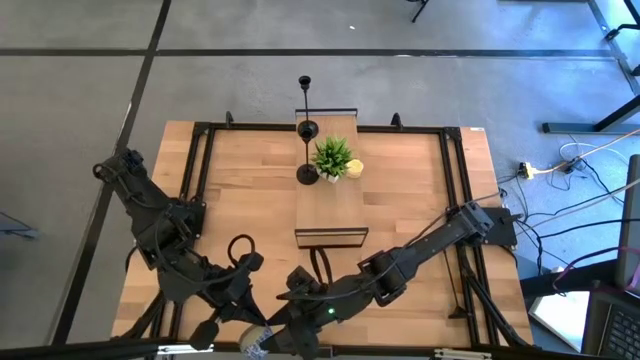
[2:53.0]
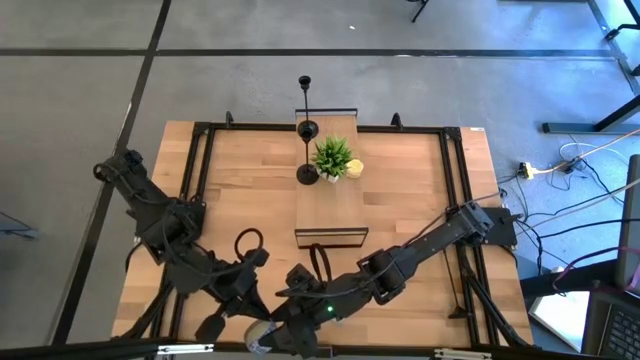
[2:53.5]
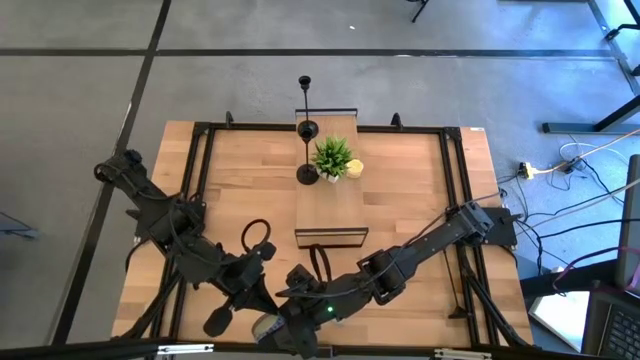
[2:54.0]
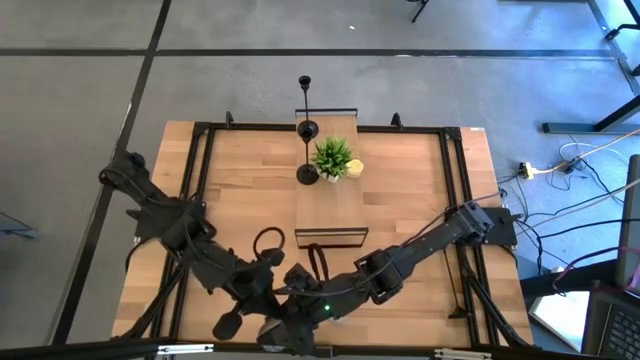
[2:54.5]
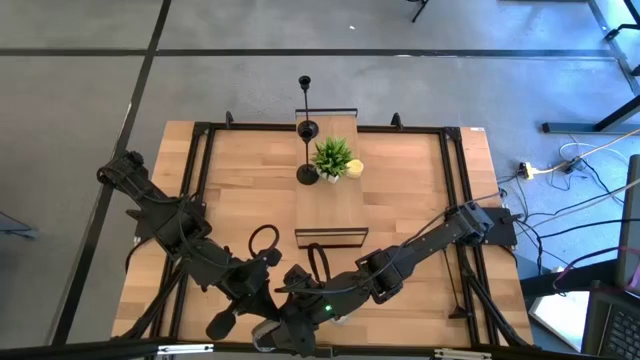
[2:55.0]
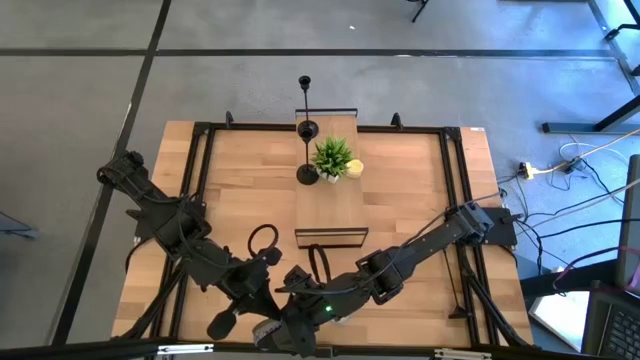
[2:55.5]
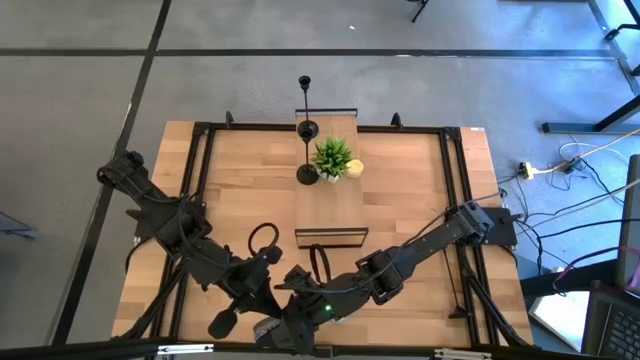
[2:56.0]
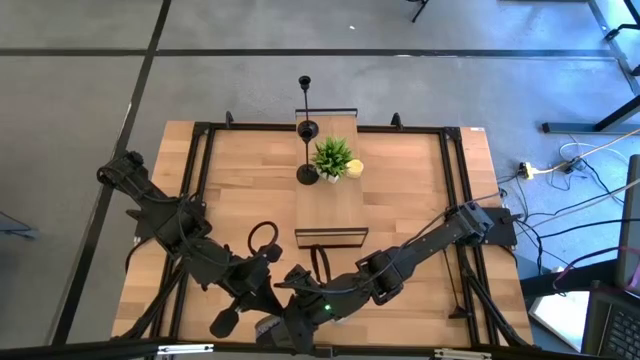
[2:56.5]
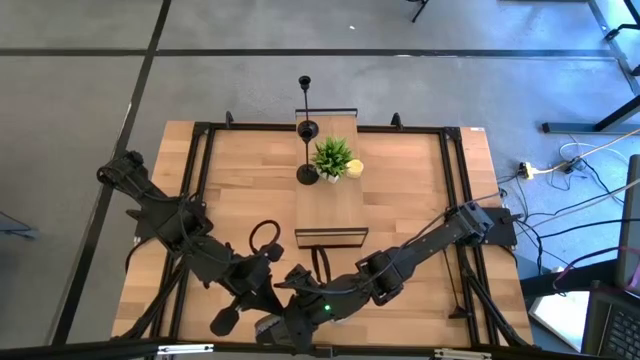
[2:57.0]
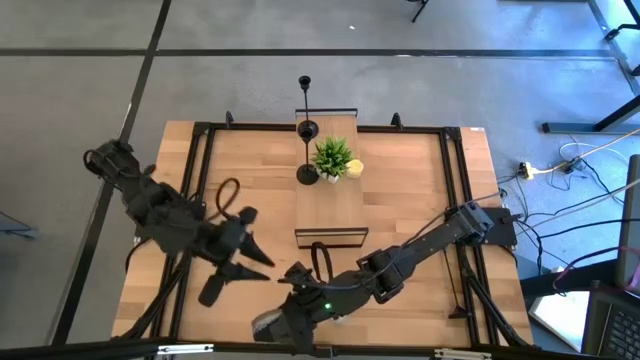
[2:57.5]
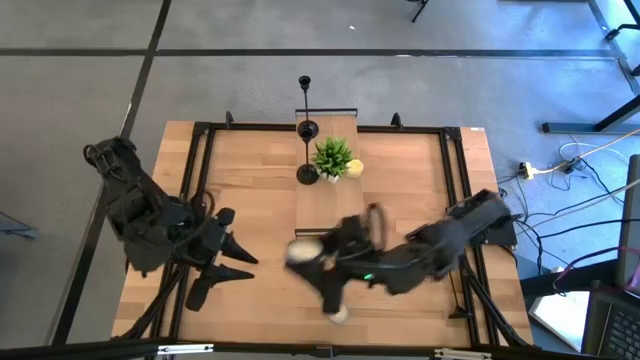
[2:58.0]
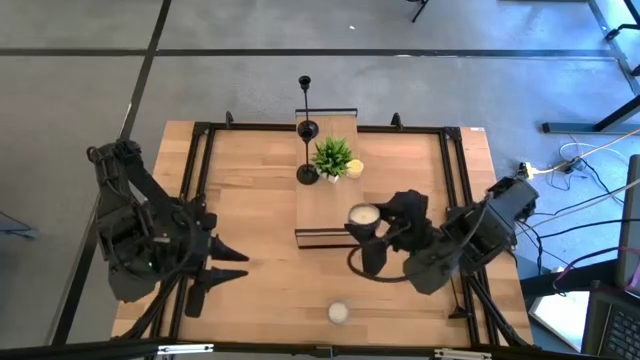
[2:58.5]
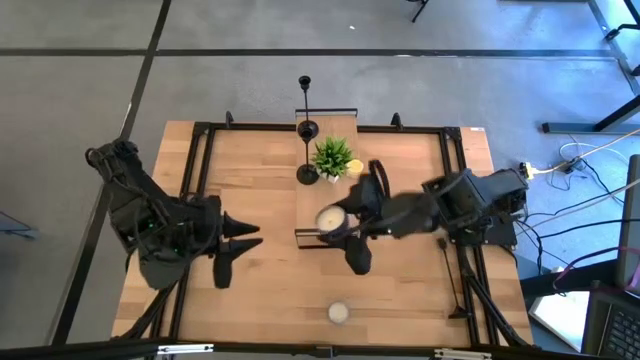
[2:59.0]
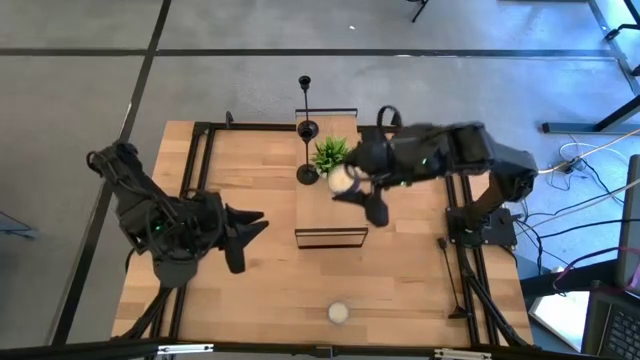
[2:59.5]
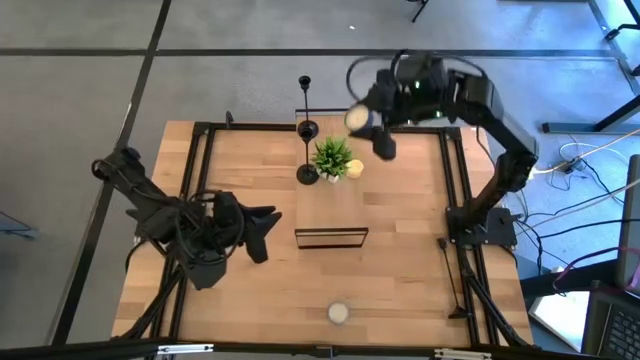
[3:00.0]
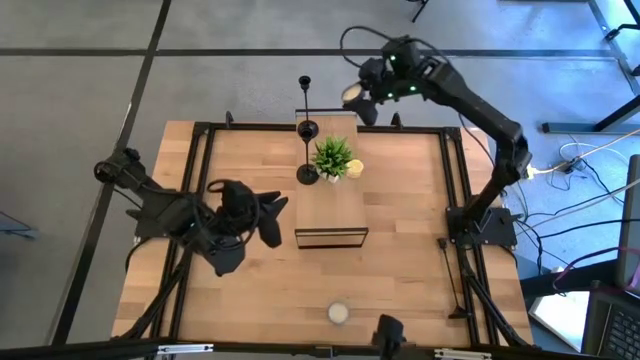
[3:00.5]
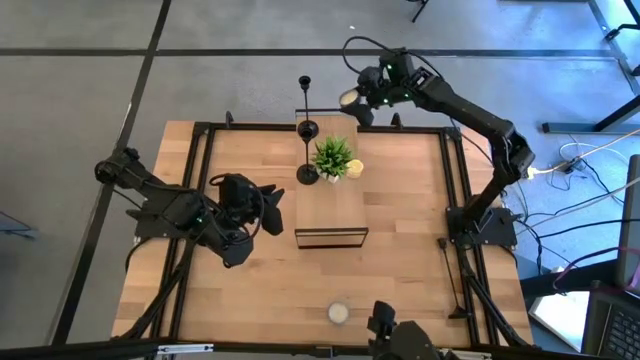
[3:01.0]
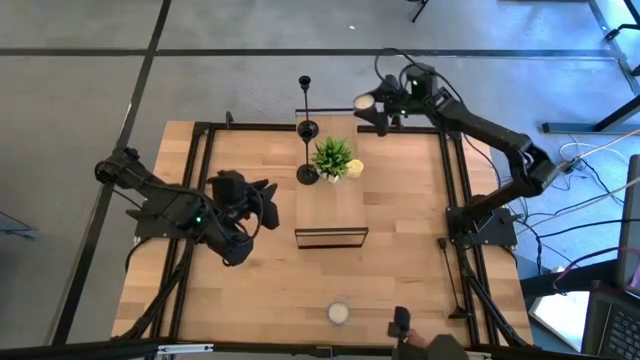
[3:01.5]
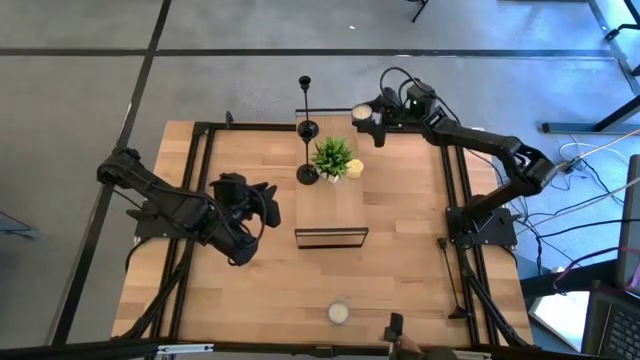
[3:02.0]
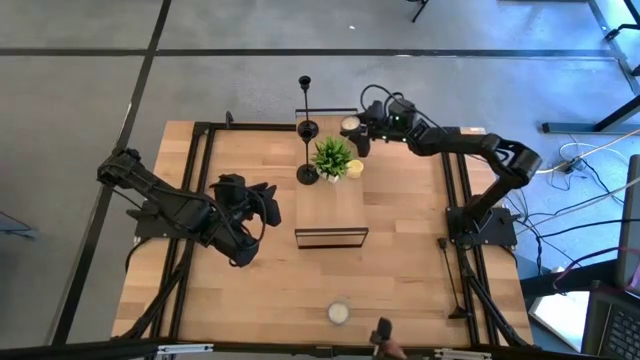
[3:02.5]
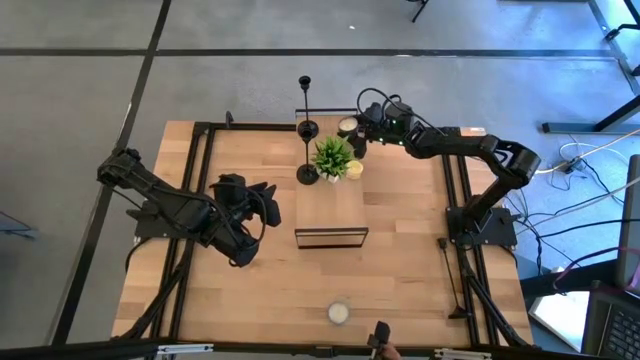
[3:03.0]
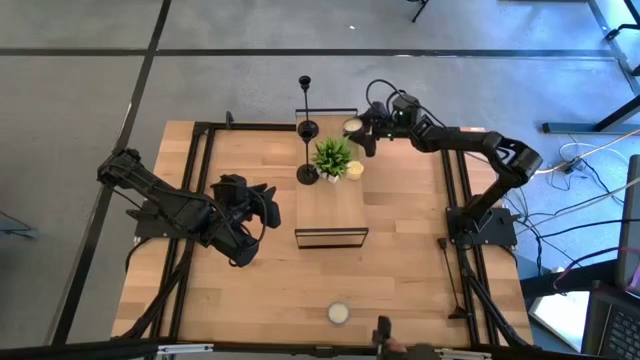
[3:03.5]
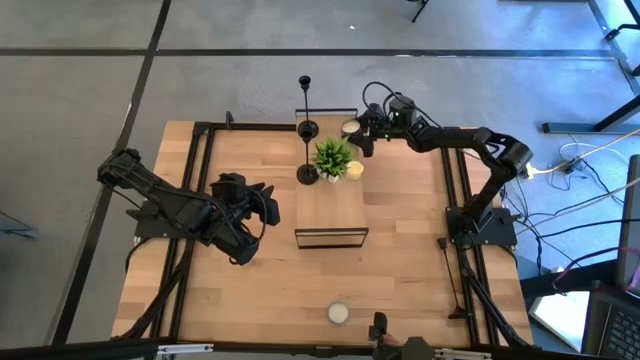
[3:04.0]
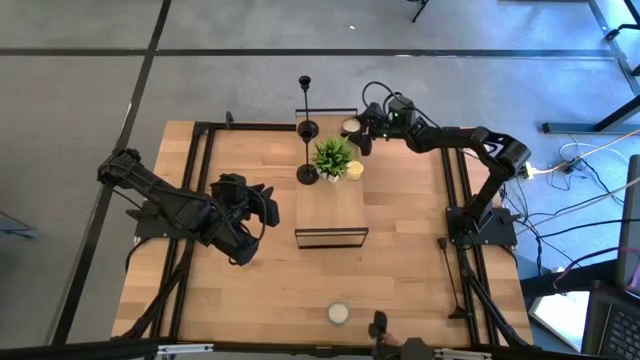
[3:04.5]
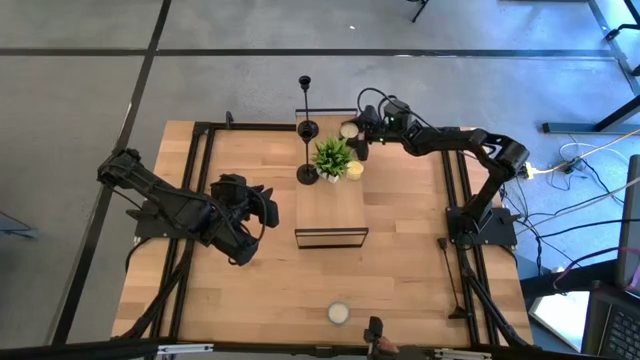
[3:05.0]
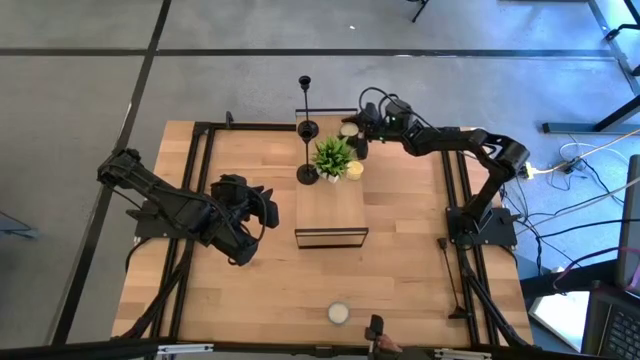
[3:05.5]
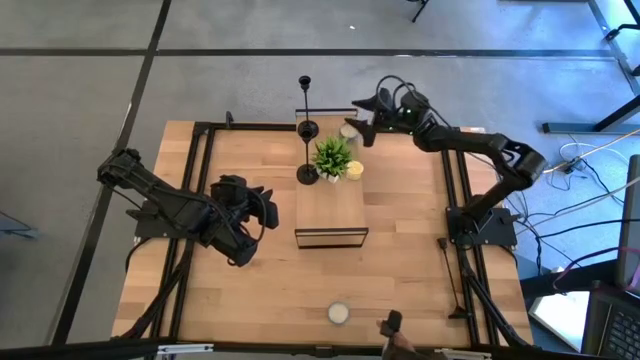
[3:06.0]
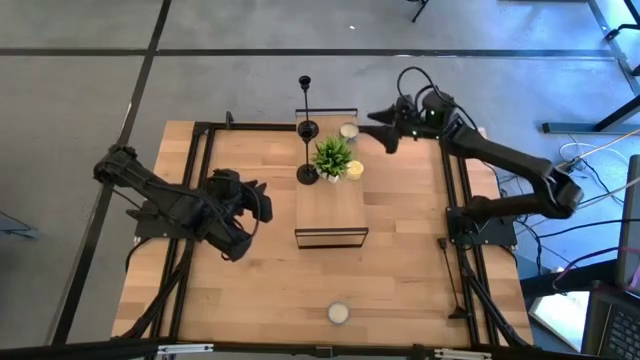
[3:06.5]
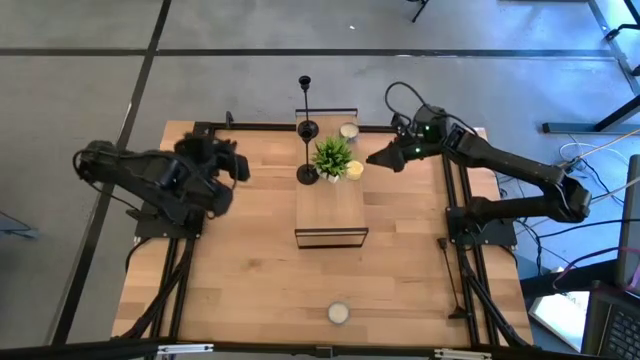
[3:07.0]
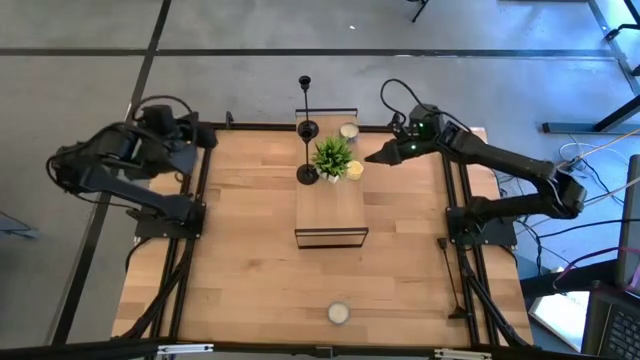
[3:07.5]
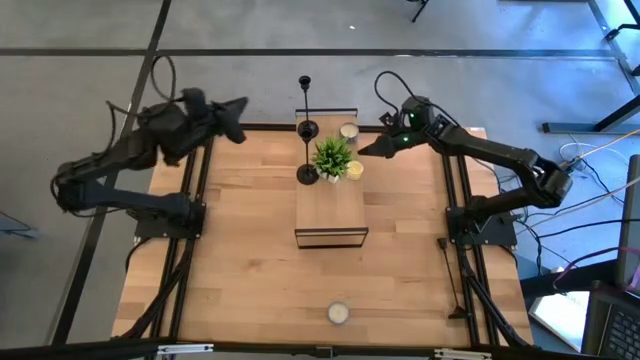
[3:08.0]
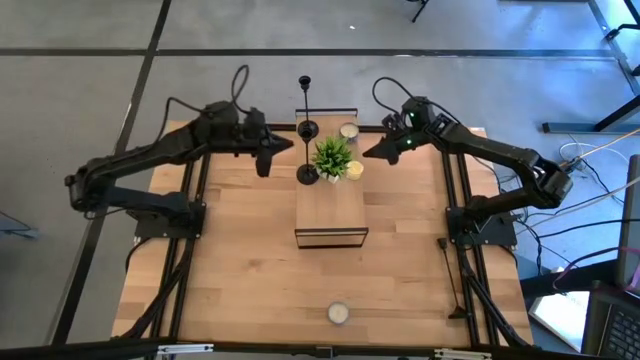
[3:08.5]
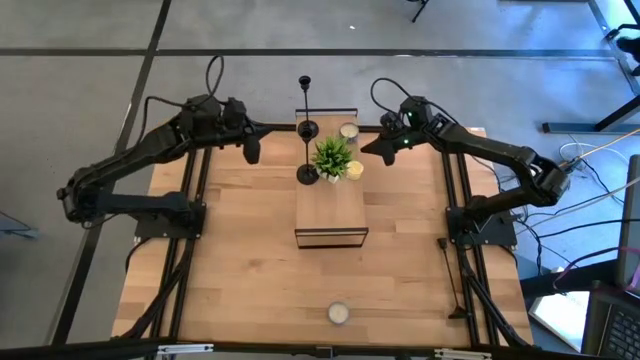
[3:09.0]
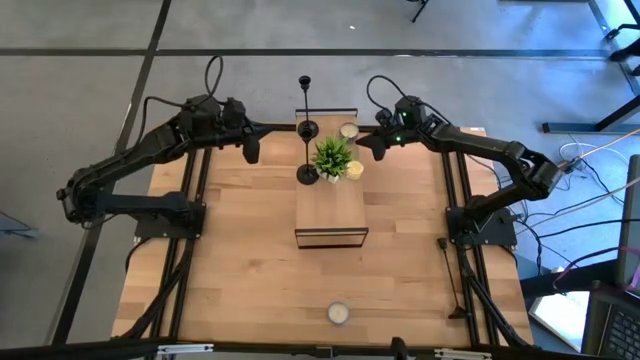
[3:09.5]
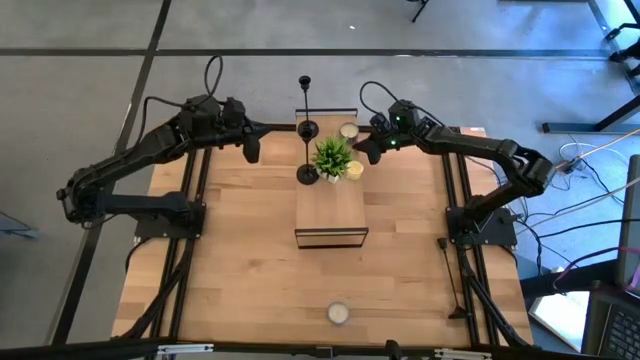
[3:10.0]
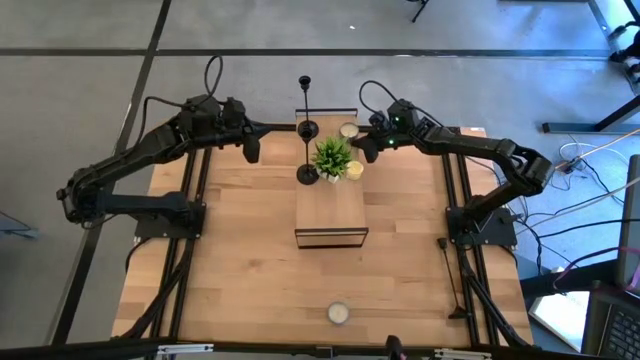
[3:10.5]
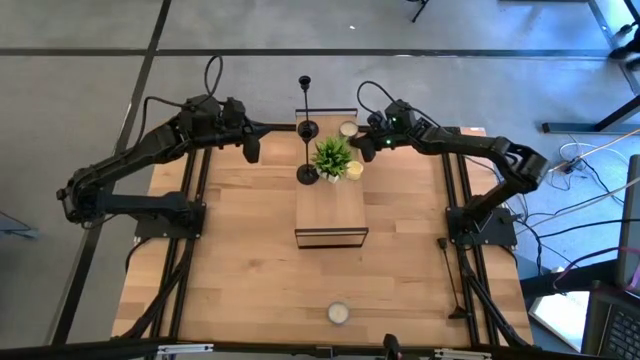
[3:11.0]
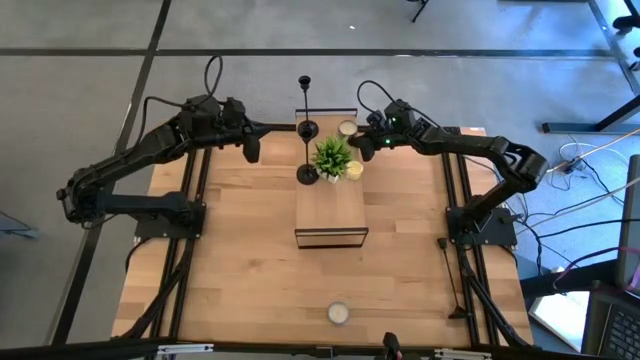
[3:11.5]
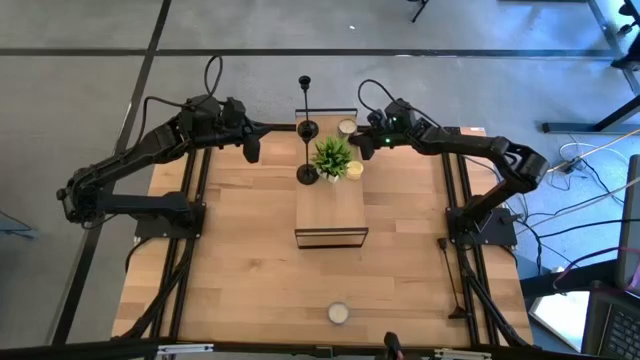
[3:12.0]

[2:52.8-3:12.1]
Task: Pick & Place candle stick holders
Put the top blue scented candle on the shelf

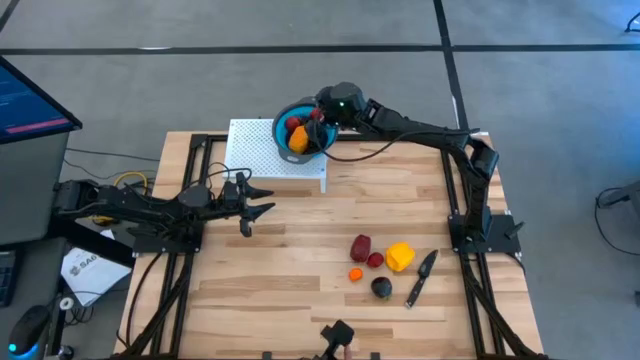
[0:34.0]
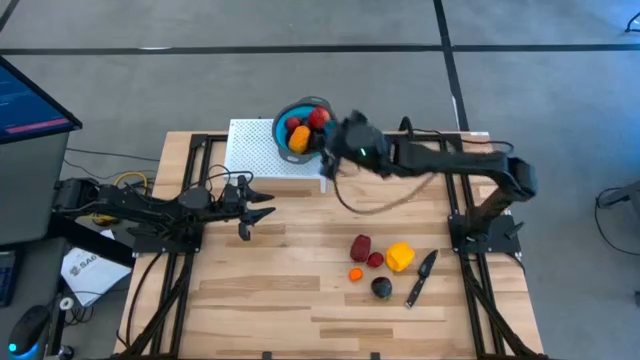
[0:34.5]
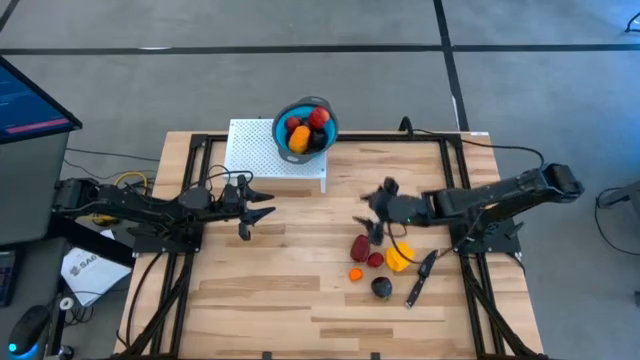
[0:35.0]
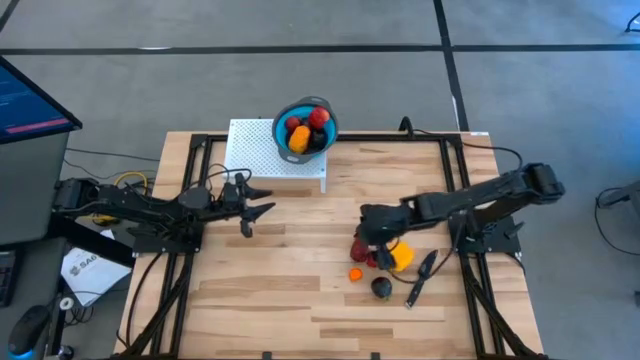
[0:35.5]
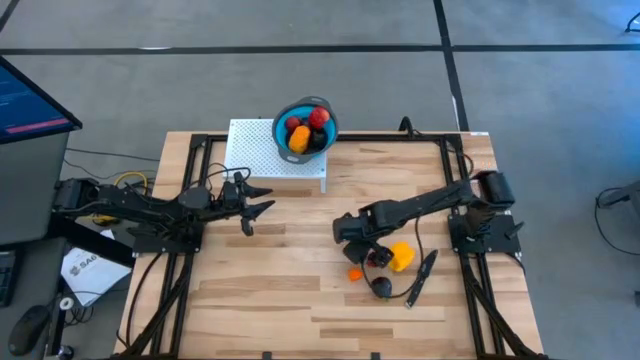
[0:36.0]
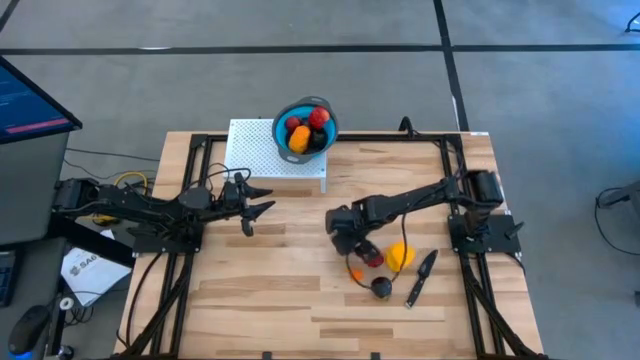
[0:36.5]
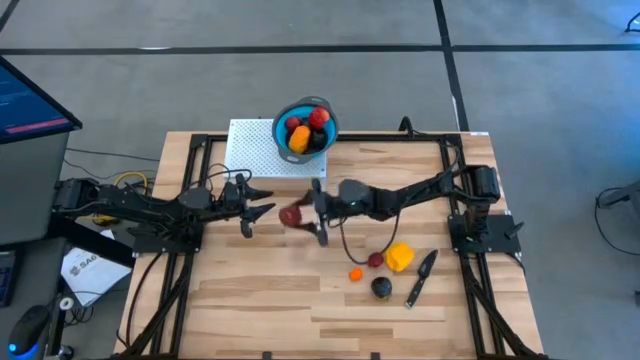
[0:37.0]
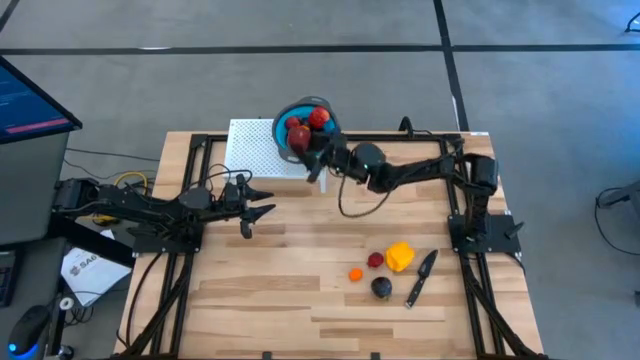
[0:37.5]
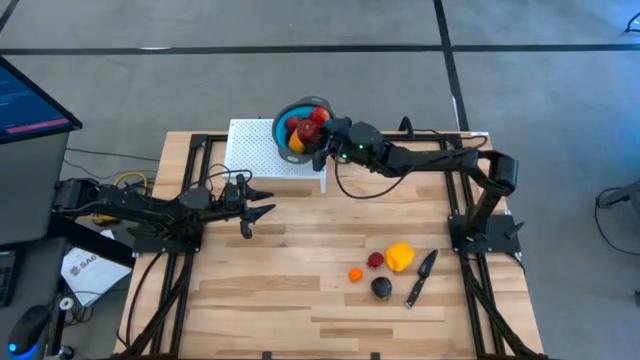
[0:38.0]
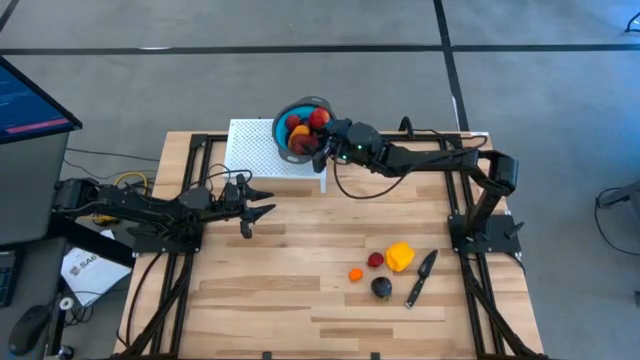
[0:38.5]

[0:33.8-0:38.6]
Task: Pick & Place Fruit
Put the red apple into the blue strainer bowl
